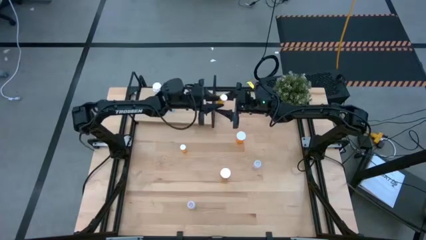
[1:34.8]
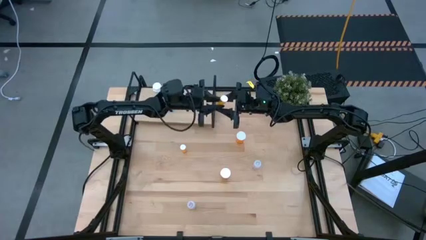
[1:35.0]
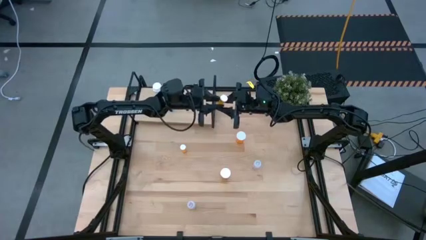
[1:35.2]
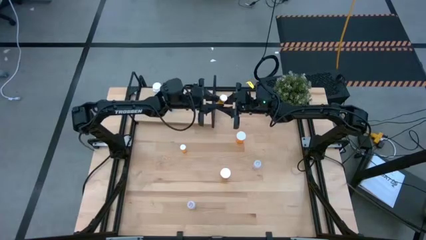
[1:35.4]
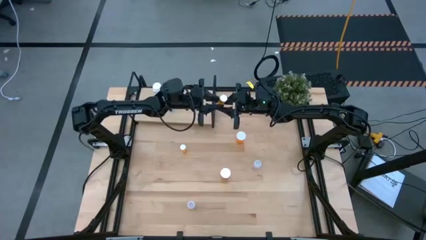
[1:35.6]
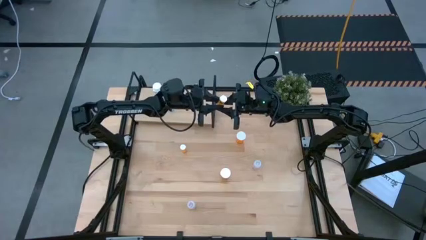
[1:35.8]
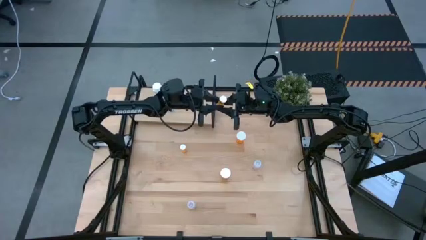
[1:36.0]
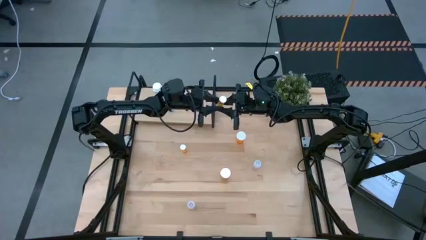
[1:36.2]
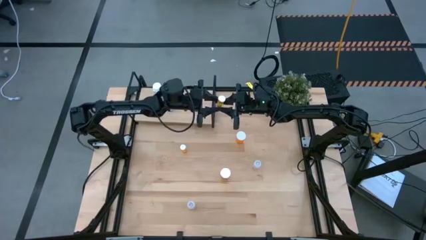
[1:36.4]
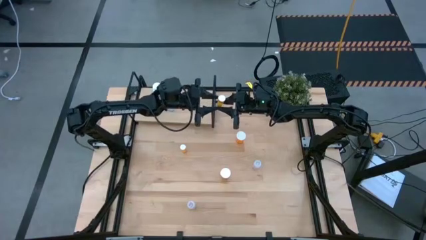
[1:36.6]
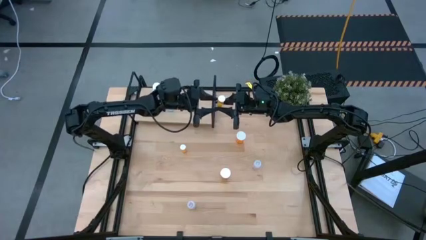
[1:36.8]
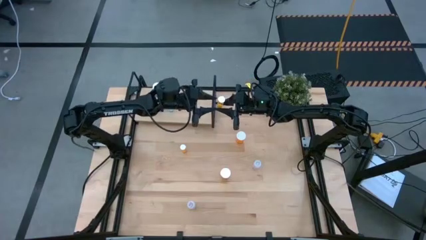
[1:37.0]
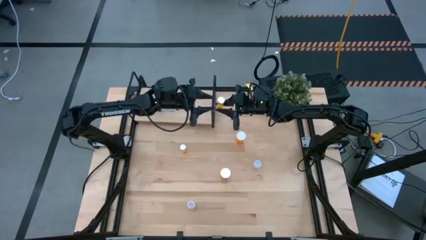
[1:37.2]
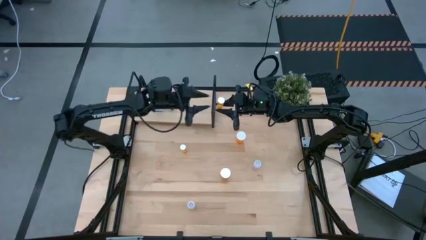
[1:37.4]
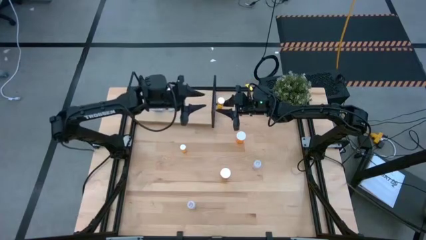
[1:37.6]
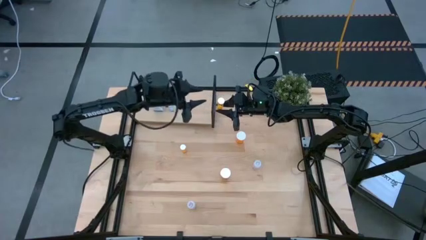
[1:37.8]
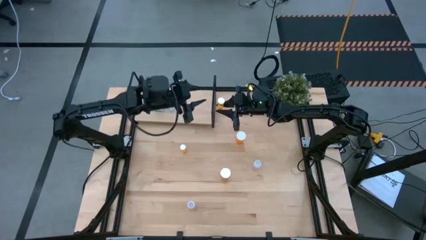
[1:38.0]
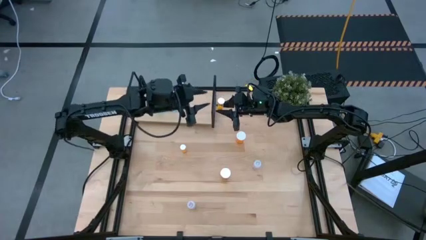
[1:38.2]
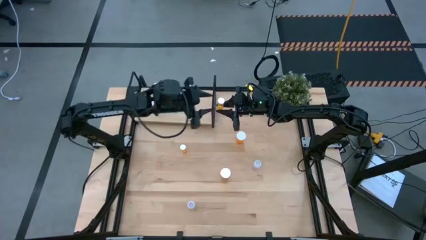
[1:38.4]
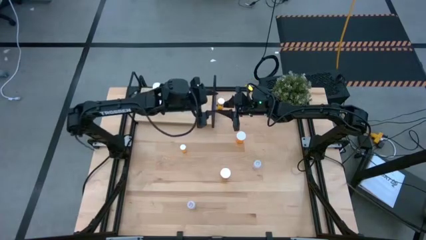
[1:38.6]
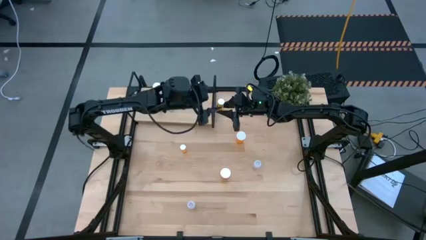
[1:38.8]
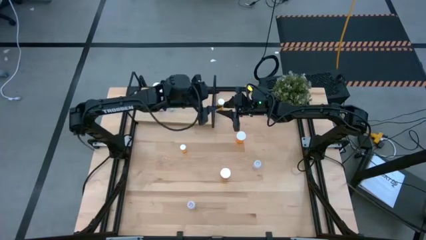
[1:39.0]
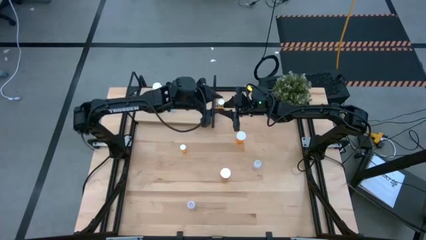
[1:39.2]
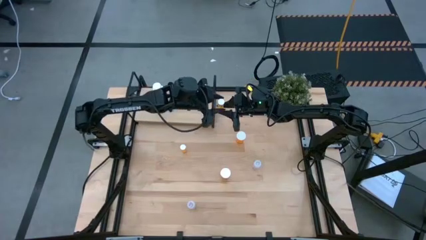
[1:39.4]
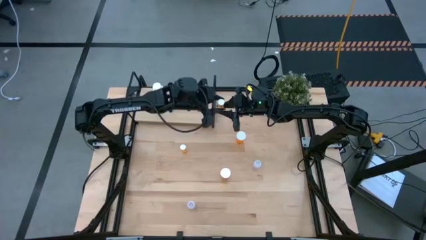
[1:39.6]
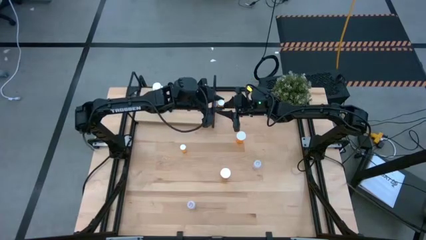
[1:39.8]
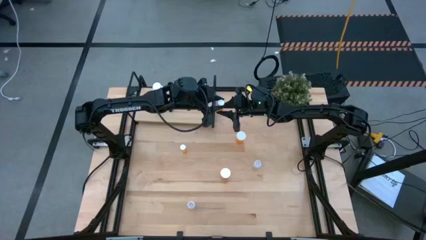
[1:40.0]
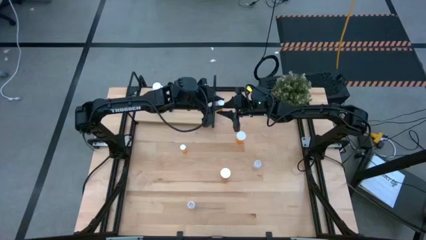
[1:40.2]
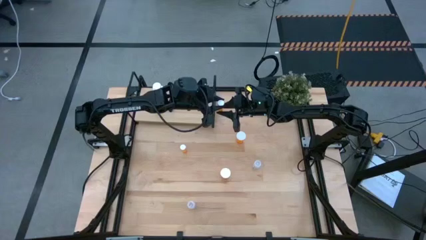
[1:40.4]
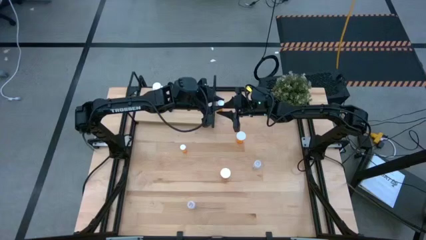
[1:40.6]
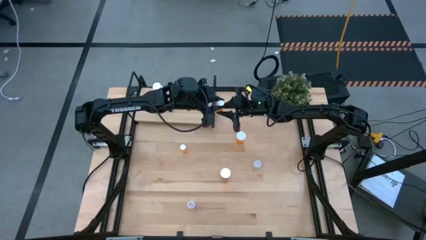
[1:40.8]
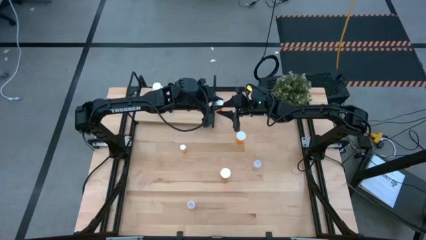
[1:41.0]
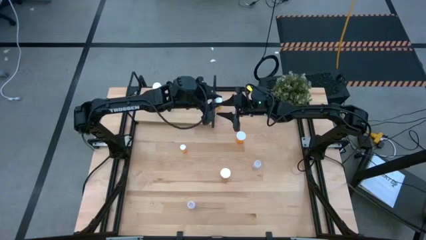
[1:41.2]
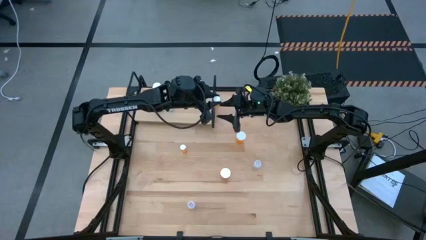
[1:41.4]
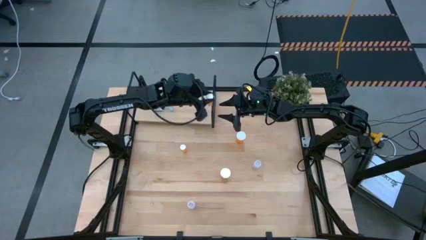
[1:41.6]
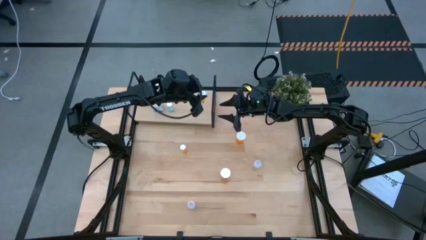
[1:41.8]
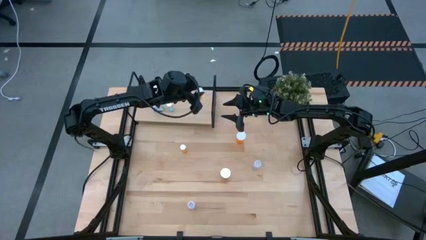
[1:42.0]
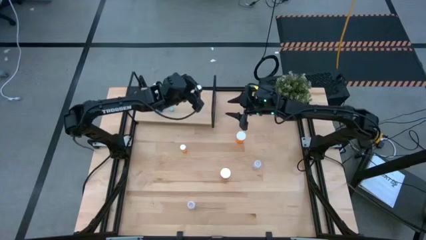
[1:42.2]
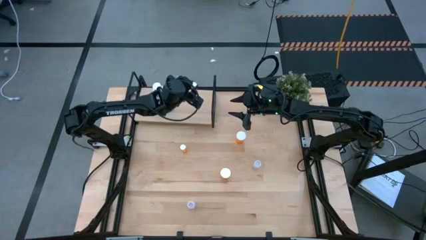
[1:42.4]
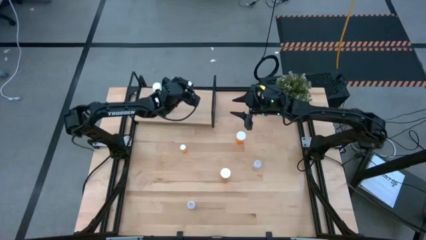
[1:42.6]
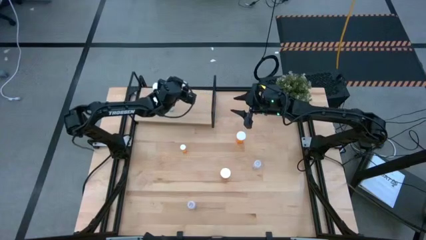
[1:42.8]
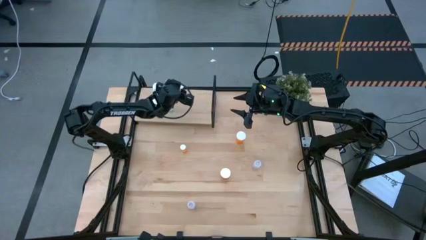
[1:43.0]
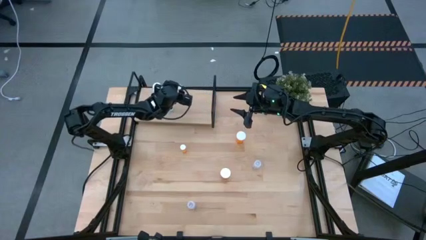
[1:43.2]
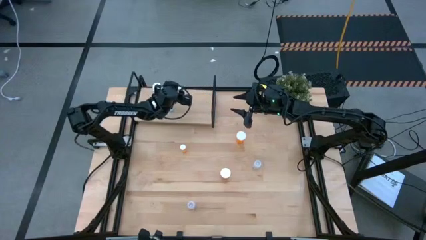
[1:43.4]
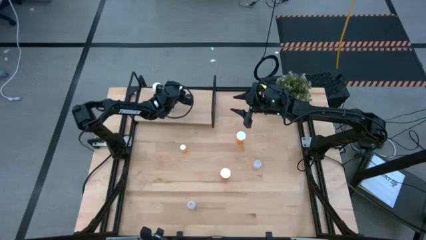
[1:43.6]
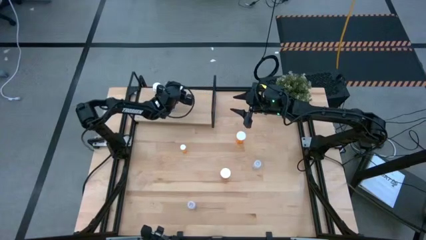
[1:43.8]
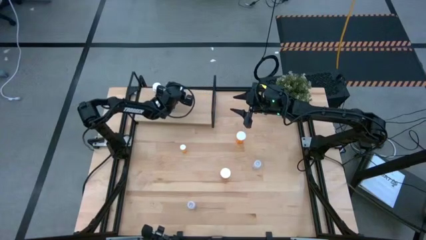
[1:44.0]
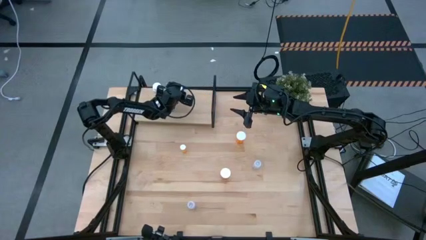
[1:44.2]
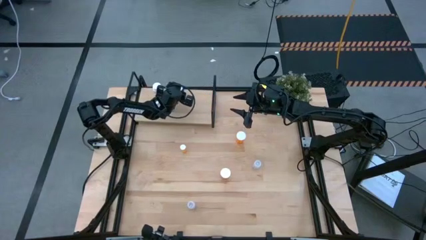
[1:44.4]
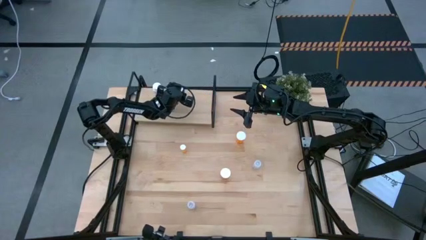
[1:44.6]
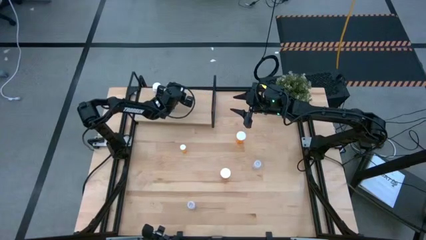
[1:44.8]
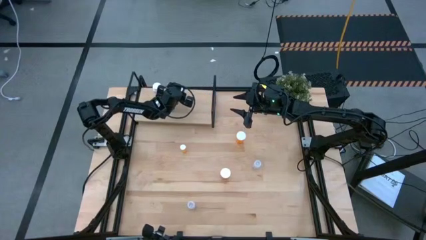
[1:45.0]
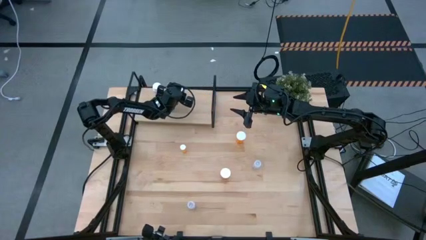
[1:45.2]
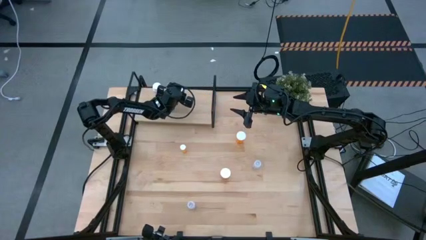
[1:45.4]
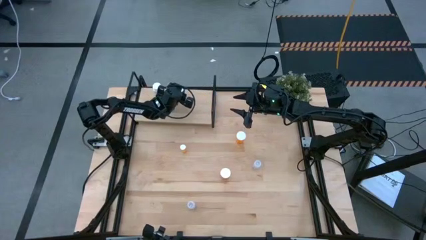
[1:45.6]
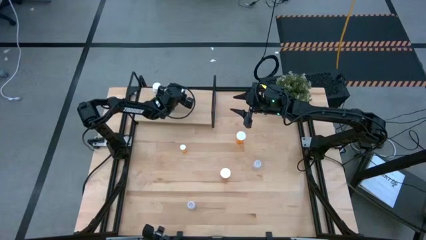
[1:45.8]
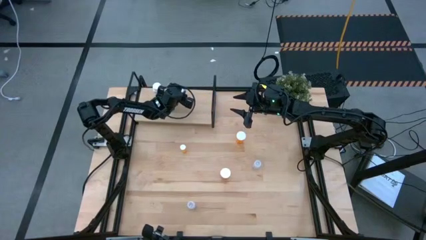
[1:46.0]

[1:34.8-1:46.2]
Task: Pick and place medicine bottles onto shelf by color
Put the bottom small orange pill bottle on the shelf

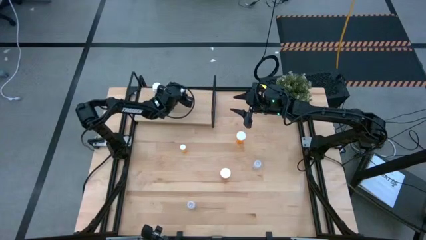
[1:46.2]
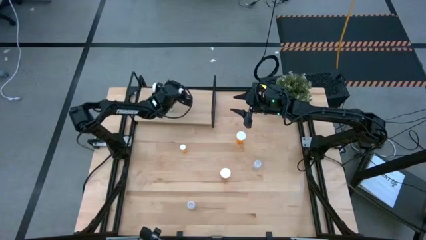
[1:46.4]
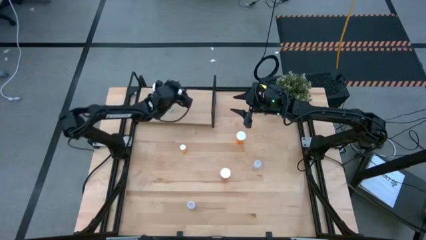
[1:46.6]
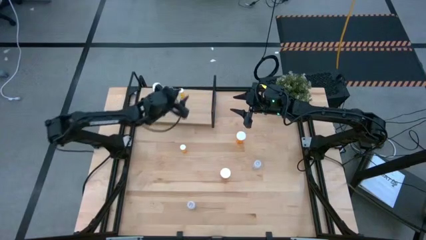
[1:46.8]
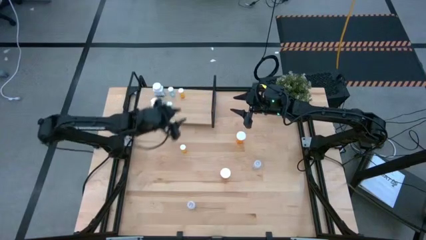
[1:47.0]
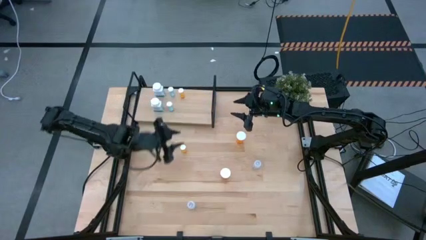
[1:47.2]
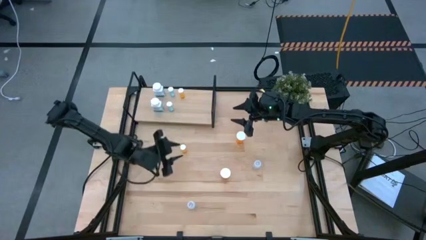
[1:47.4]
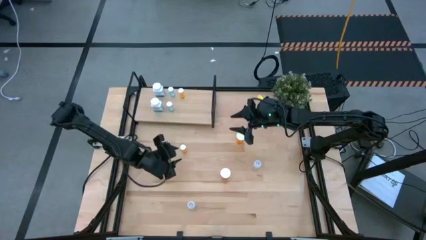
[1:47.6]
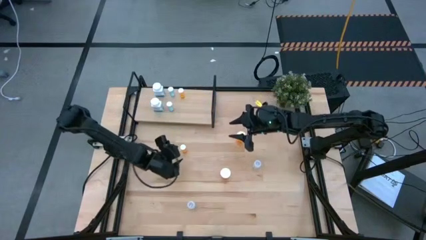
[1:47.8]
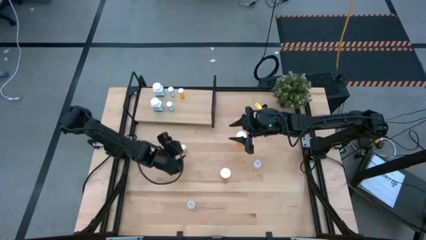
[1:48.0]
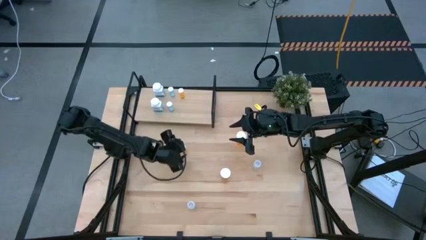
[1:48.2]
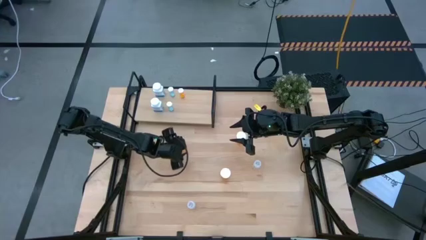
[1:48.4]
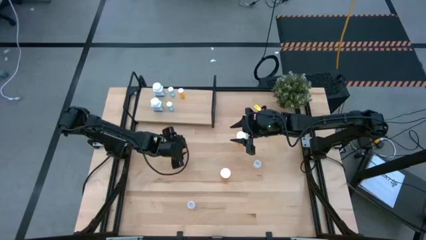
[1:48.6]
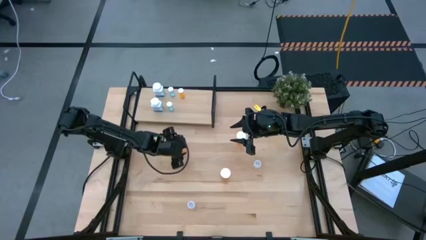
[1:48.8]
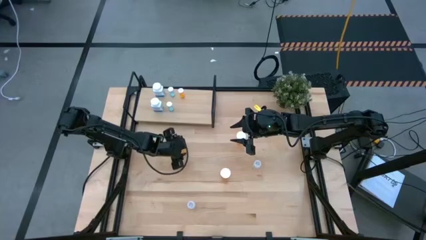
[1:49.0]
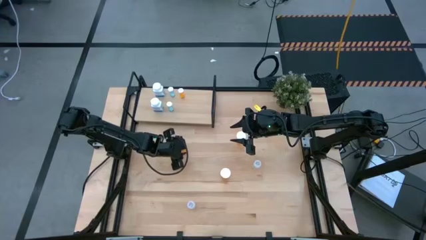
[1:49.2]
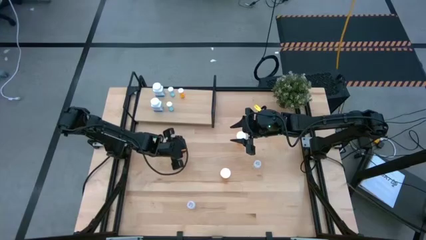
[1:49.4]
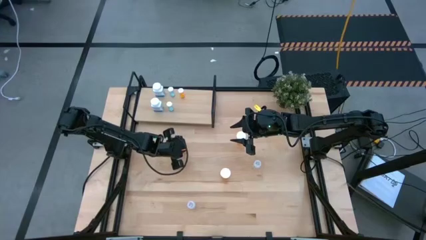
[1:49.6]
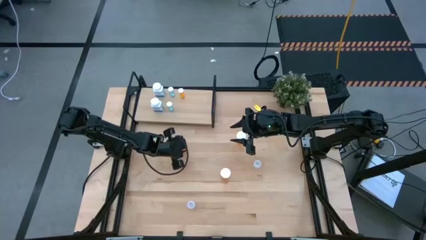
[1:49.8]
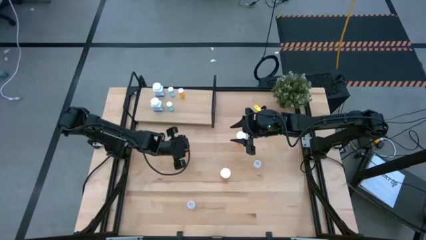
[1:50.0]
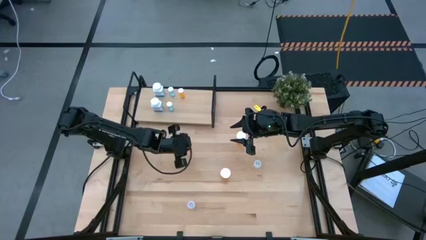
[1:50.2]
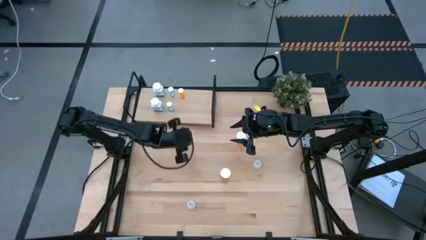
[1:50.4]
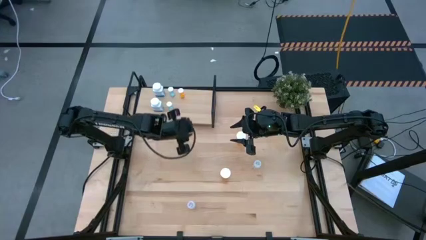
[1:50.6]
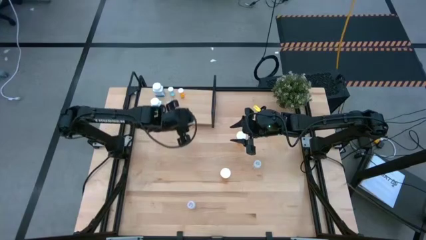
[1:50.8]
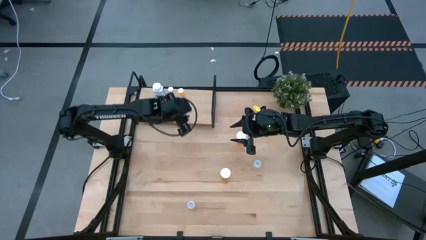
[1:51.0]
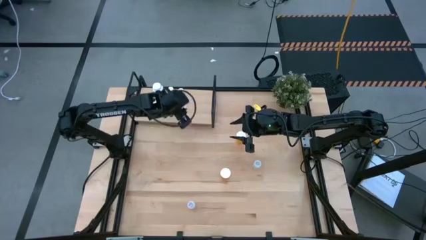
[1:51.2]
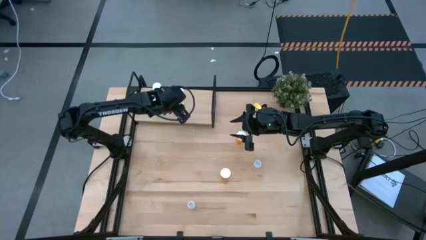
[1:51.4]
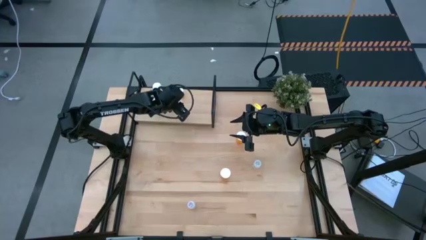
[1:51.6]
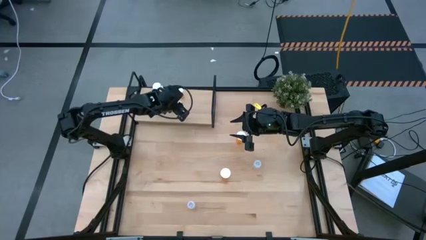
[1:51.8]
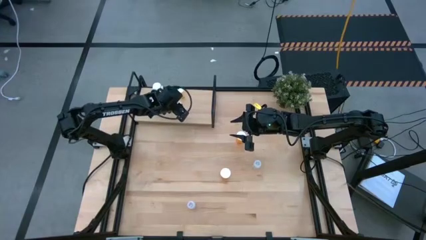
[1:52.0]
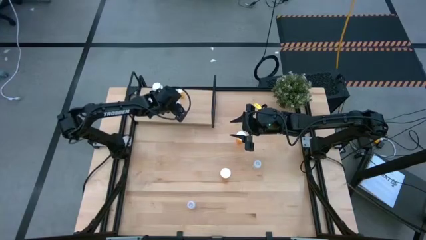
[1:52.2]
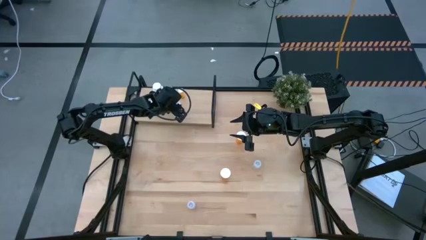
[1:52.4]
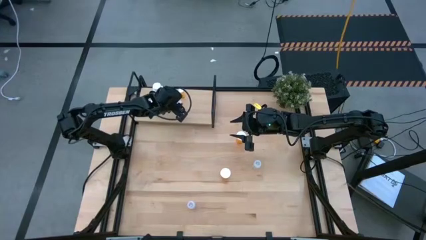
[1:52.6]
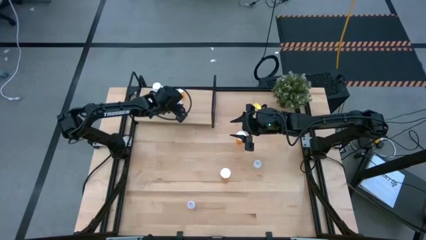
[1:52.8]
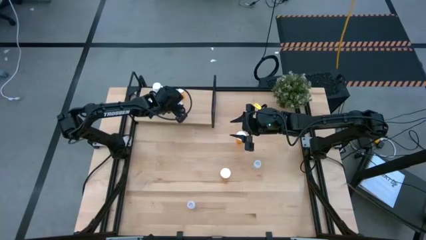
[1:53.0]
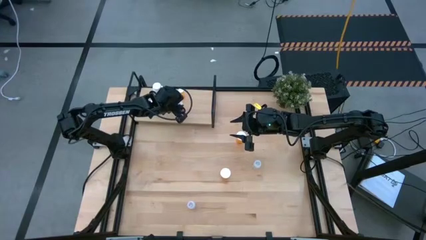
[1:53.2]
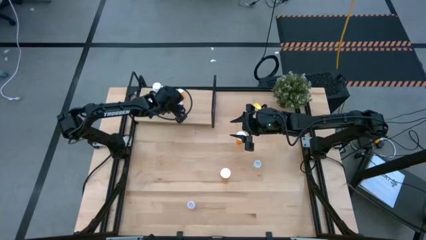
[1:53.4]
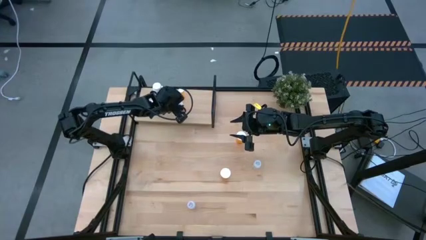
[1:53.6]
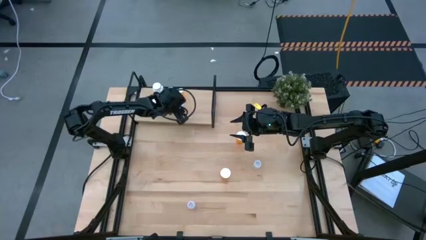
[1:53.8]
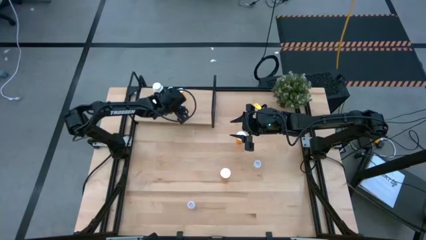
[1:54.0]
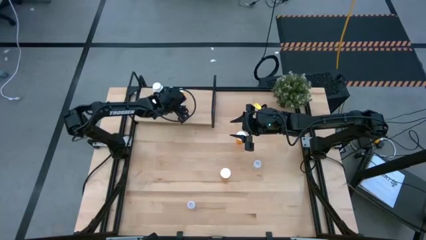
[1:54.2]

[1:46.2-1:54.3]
Put the small orange pill bottle aligned with the other small orange pill bottle on the shelf
